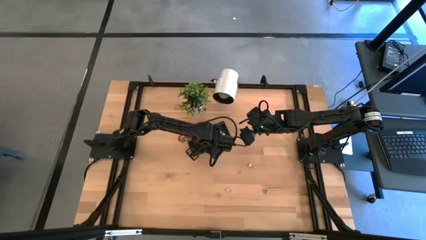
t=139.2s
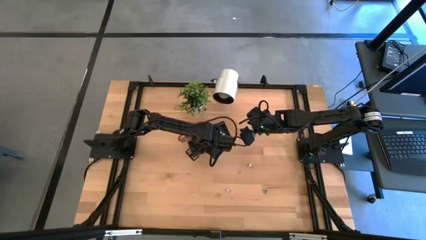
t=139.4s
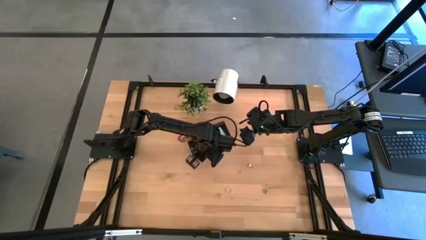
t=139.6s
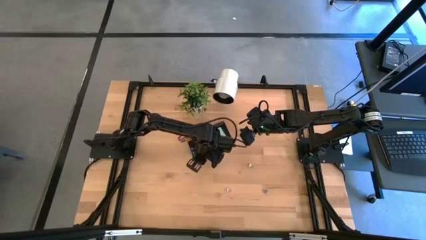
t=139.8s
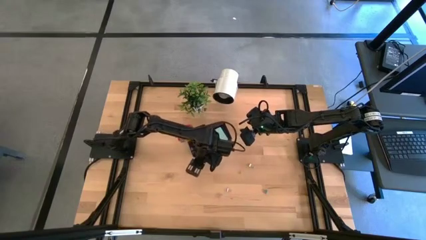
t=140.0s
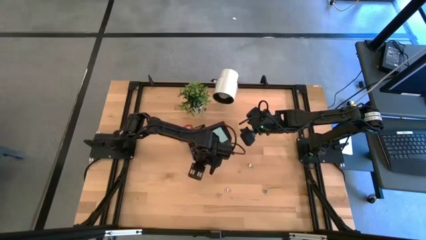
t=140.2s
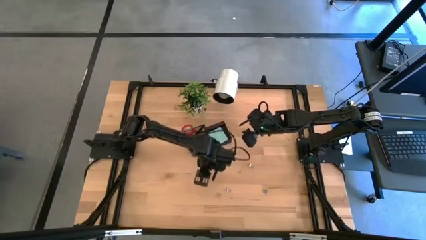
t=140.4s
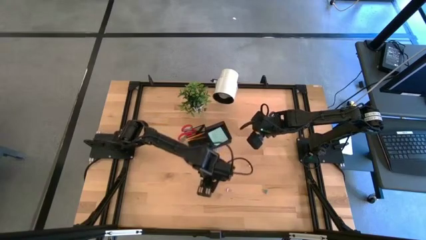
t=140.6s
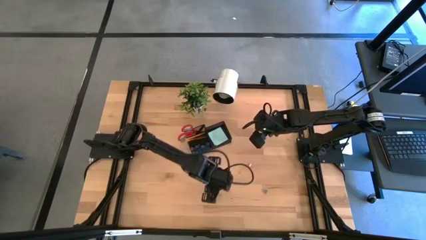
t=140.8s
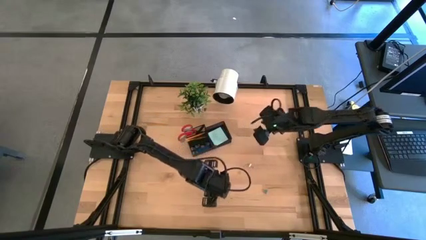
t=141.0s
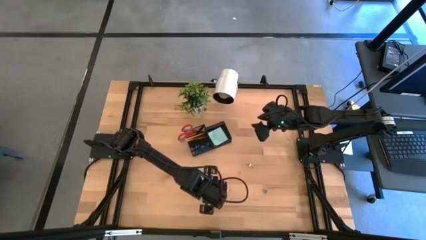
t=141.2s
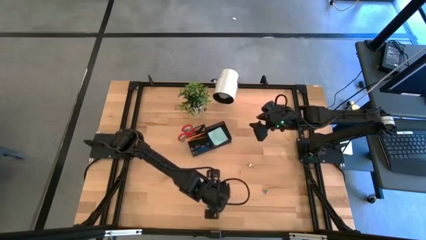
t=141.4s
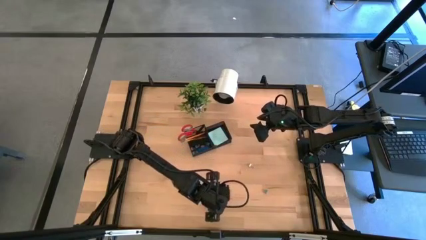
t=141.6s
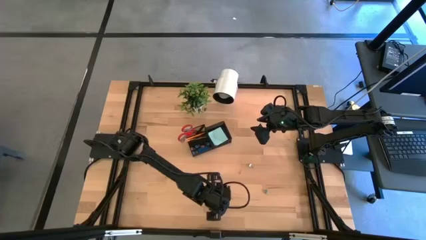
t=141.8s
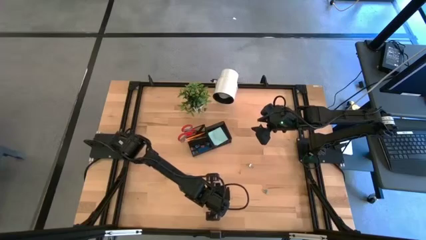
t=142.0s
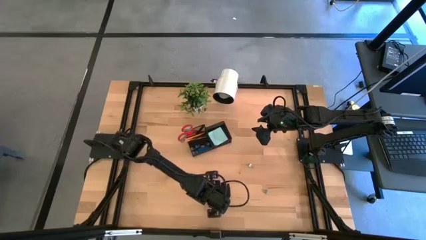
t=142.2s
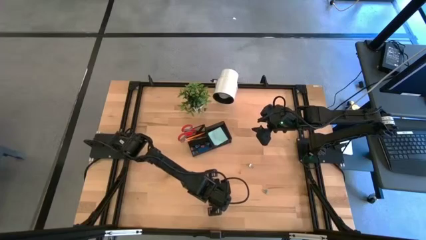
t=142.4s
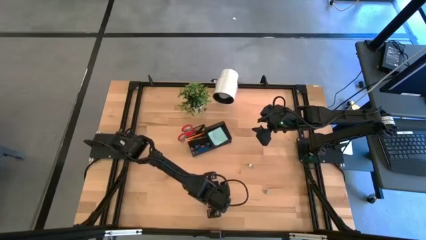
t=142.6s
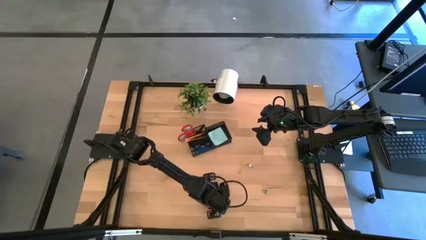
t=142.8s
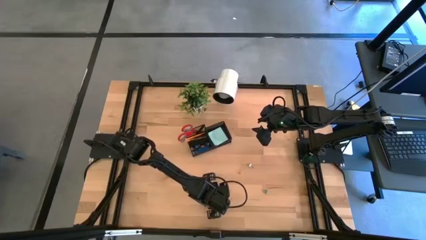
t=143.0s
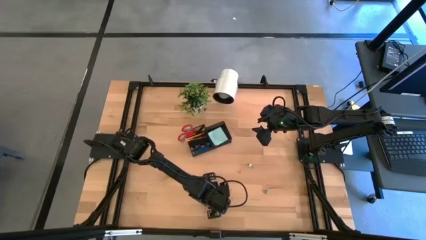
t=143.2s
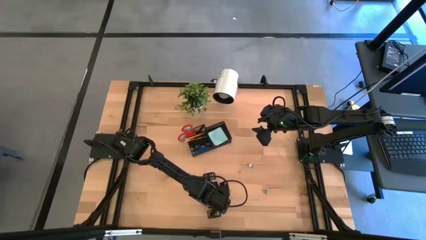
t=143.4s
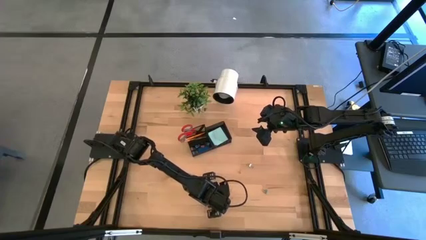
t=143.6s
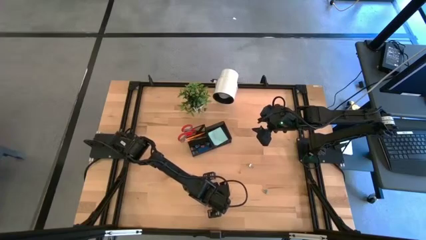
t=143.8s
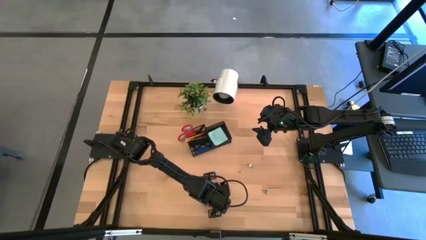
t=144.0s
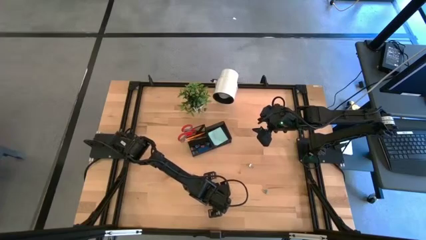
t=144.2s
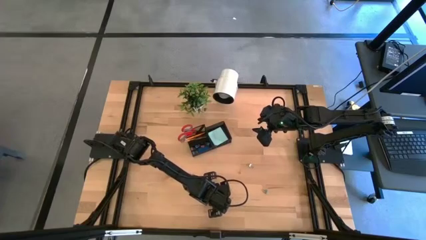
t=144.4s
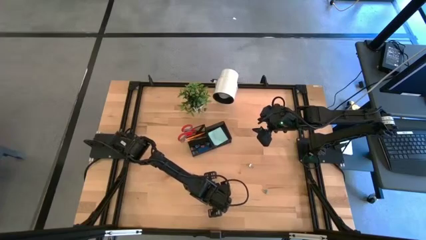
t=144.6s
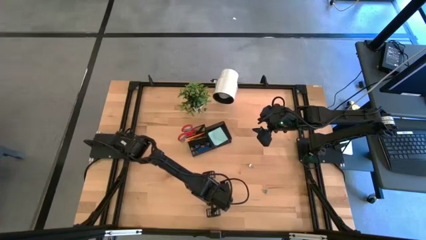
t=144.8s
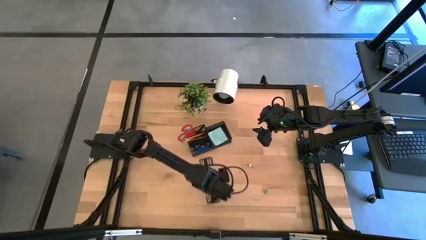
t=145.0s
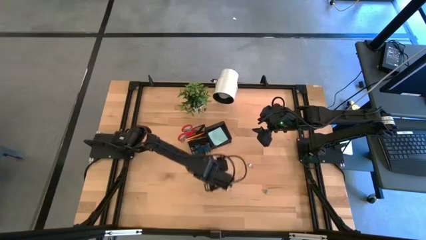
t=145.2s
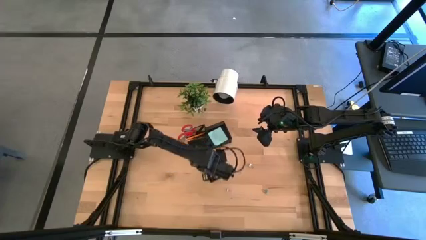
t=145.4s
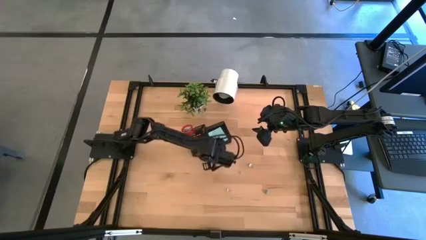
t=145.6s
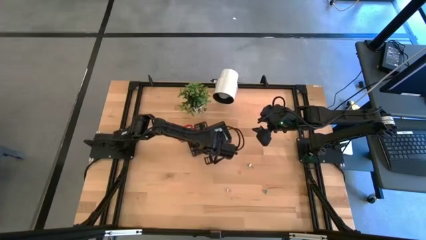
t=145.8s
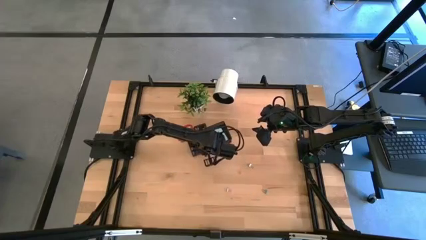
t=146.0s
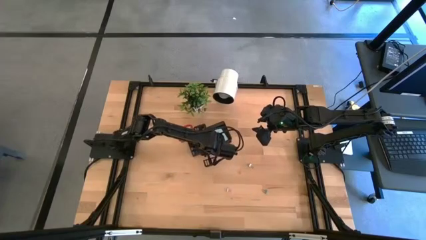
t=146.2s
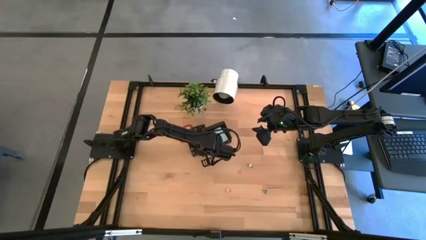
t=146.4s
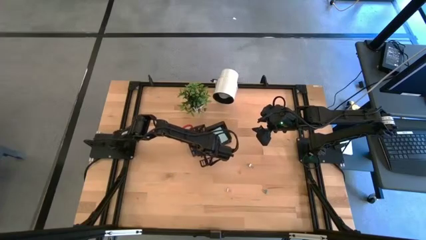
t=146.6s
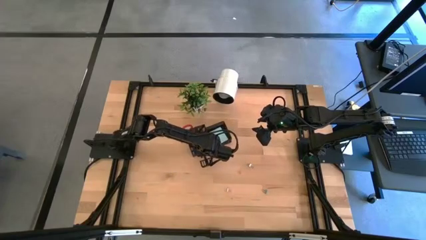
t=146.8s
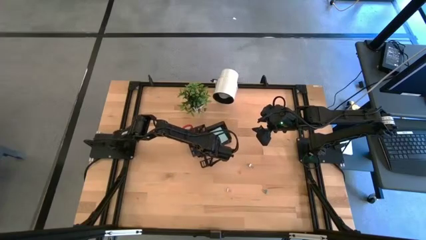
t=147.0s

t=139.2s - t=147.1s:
Task: Pick and place office supplies into organizer
Put the pink binder clip into the black desk organizer

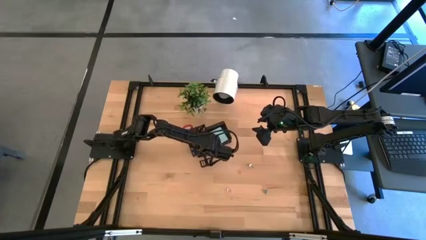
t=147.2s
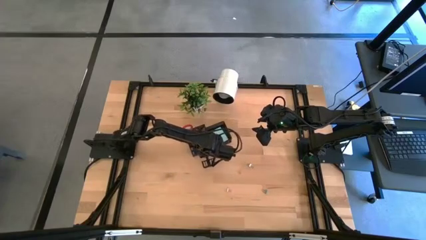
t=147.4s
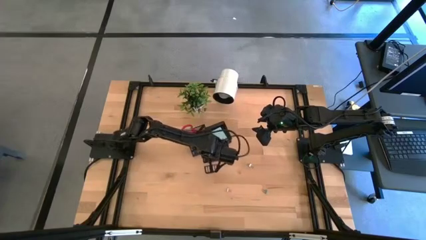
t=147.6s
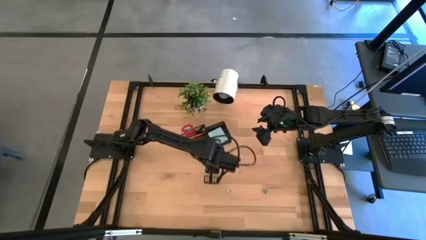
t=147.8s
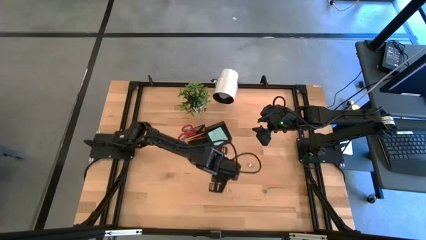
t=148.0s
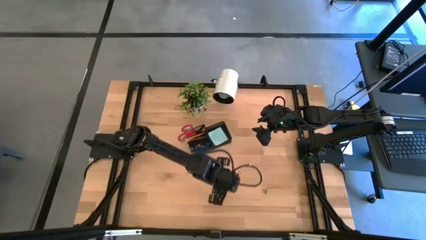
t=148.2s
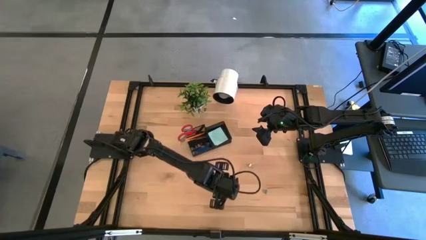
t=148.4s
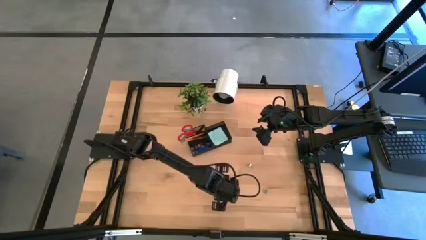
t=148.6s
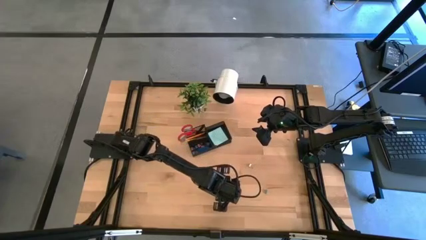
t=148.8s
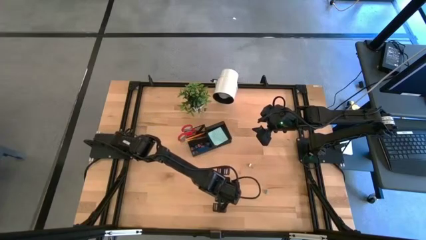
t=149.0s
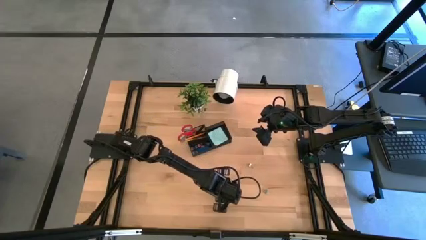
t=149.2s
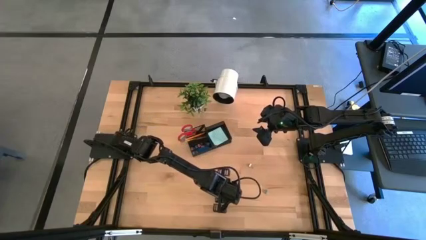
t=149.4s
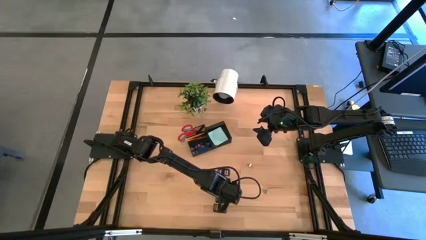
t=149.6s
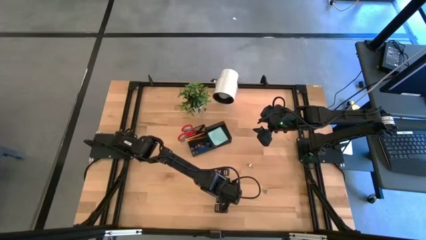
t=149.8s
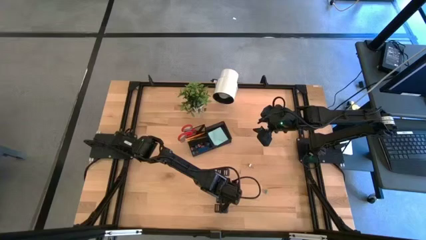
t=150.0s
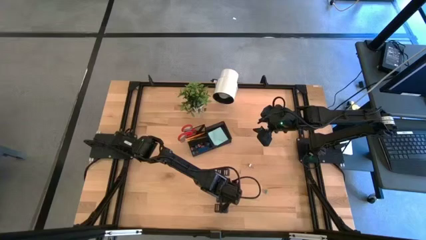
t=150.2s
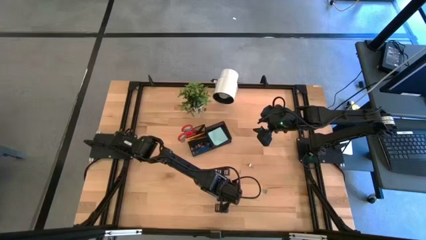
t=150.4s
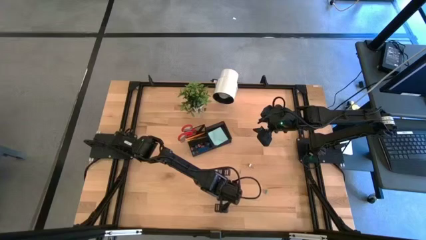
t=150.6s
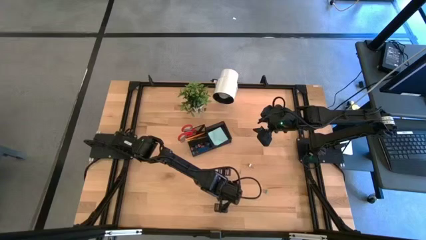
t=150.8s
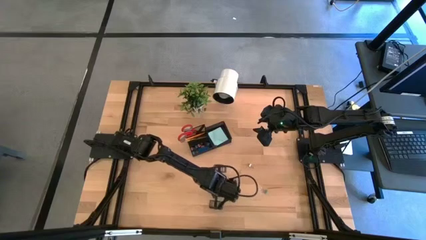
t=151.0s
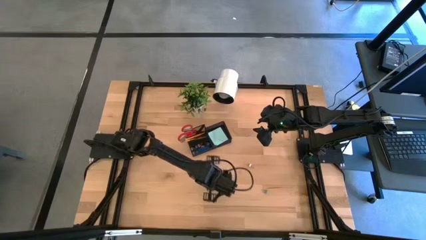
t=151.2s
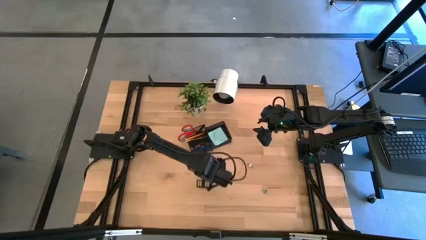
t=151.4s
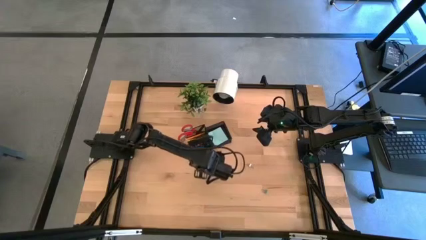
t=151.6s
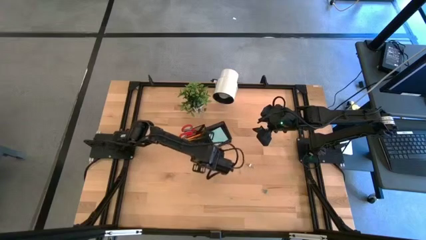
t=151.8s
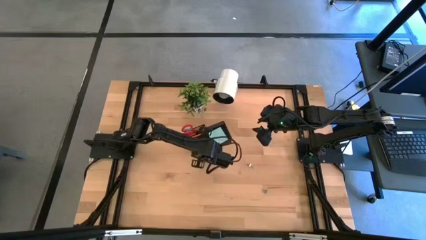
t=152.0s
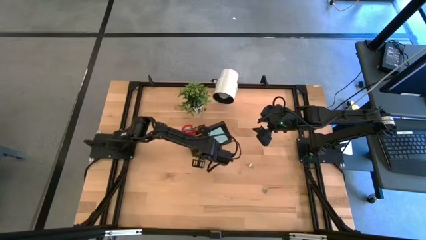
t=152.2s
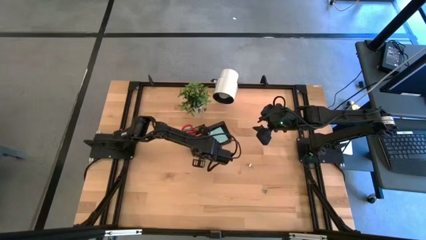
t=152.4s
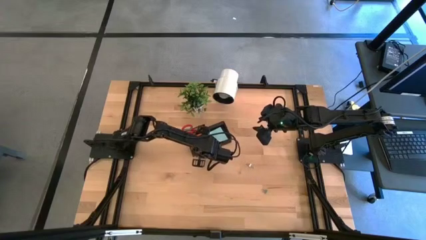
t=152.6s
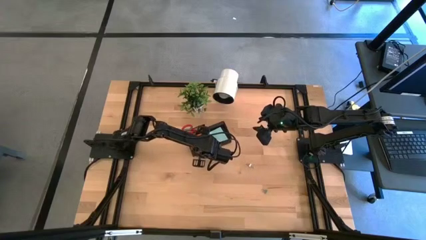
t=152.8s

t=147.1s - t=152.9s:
Put the pink binder clip into the black desk organizer
